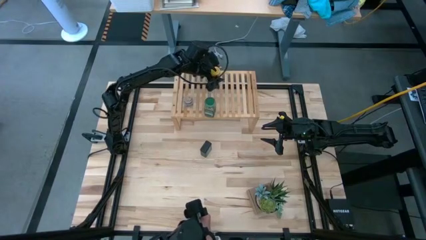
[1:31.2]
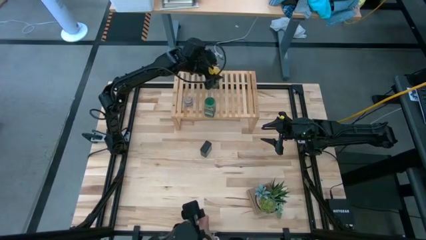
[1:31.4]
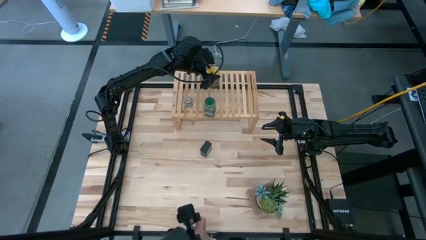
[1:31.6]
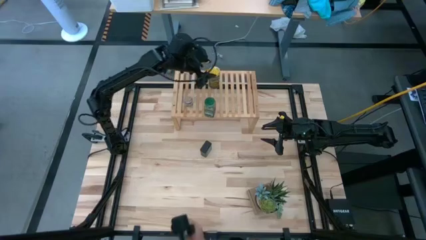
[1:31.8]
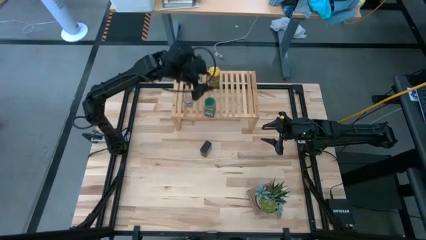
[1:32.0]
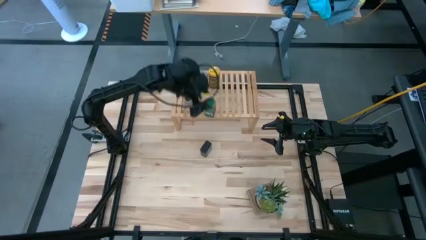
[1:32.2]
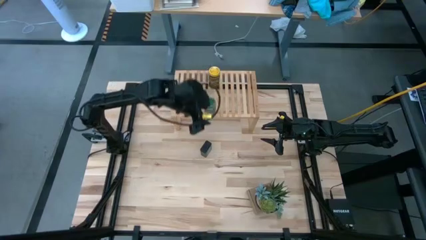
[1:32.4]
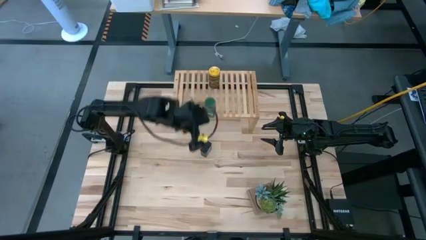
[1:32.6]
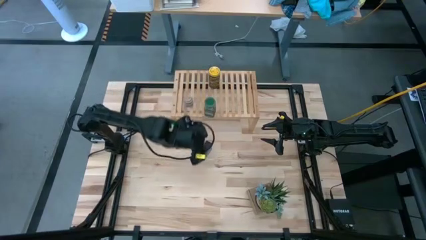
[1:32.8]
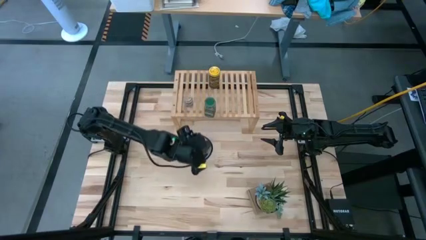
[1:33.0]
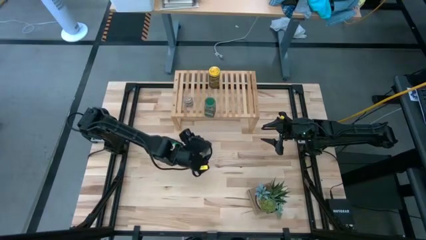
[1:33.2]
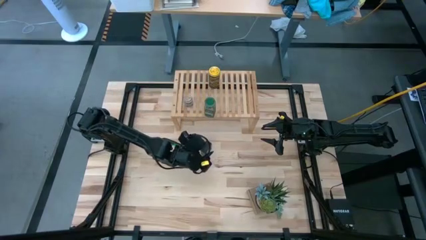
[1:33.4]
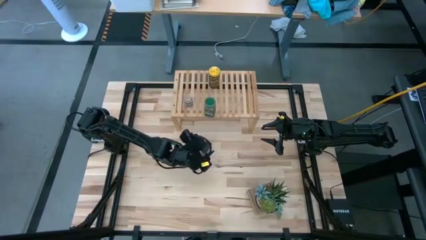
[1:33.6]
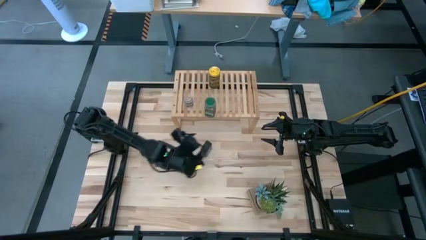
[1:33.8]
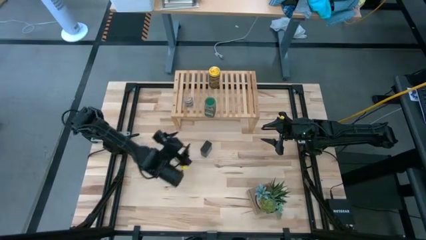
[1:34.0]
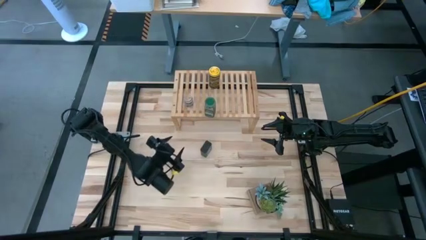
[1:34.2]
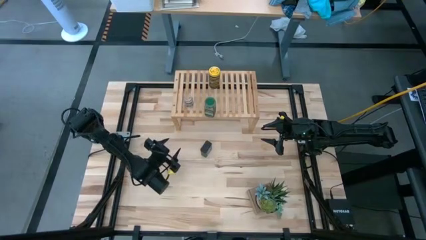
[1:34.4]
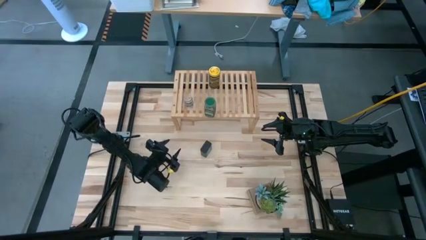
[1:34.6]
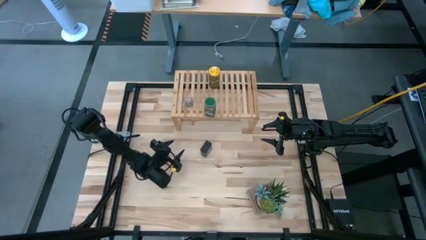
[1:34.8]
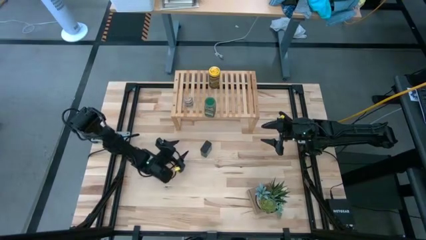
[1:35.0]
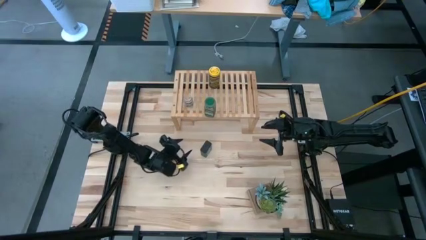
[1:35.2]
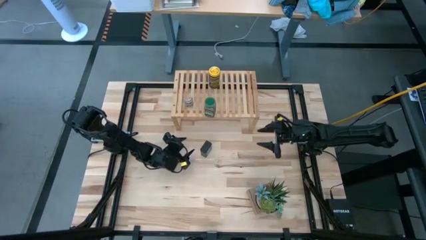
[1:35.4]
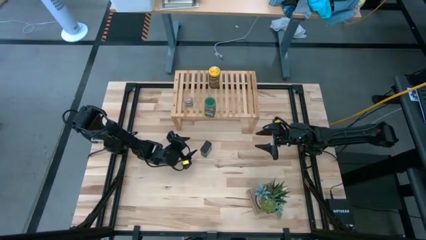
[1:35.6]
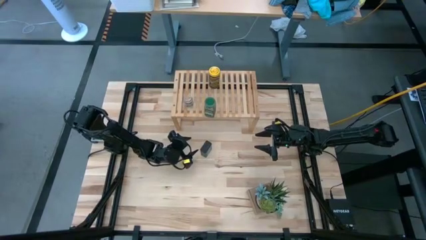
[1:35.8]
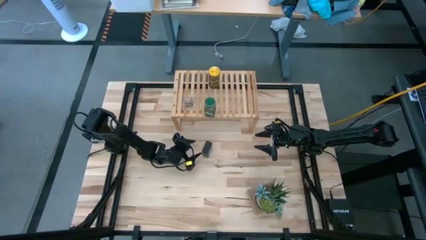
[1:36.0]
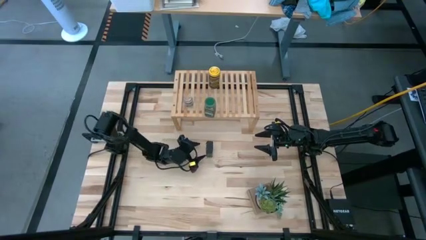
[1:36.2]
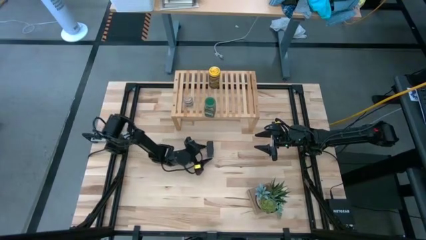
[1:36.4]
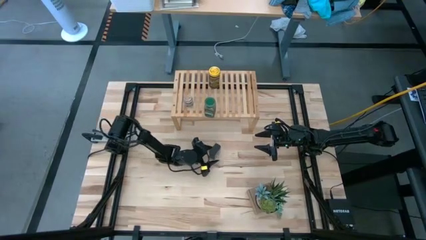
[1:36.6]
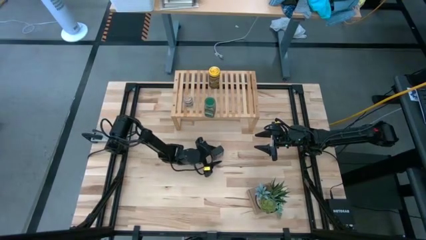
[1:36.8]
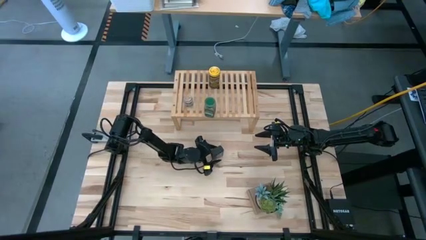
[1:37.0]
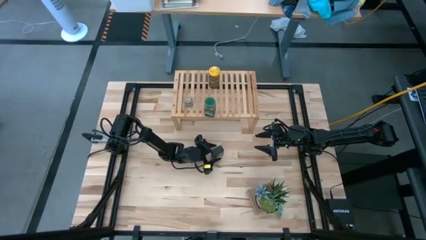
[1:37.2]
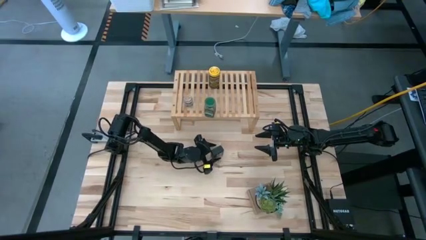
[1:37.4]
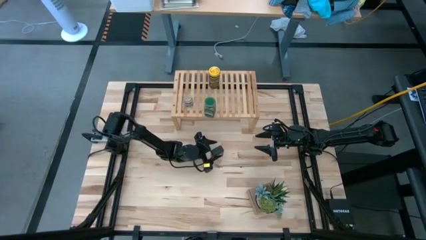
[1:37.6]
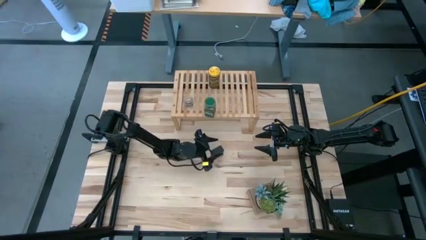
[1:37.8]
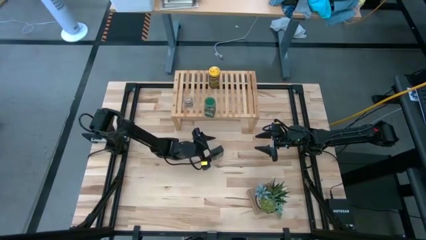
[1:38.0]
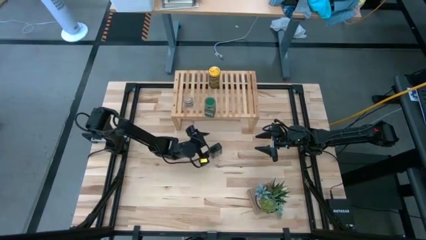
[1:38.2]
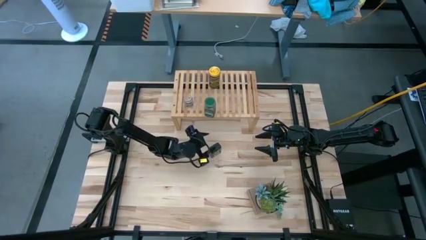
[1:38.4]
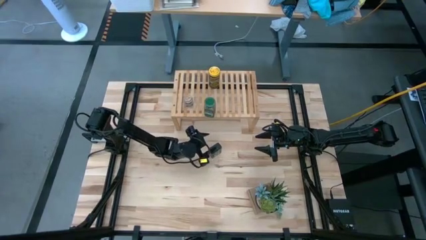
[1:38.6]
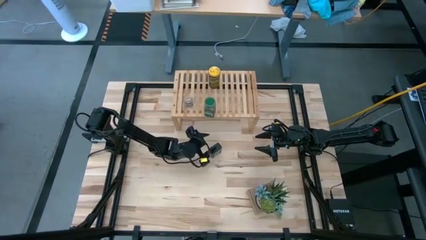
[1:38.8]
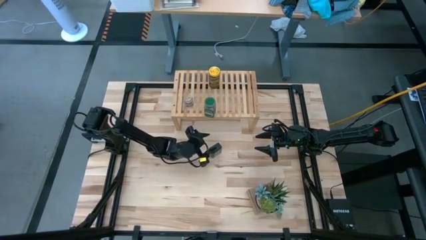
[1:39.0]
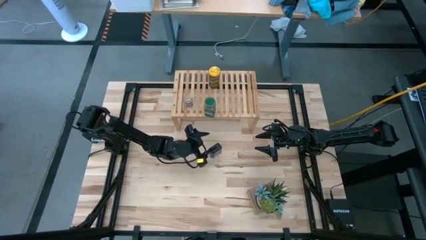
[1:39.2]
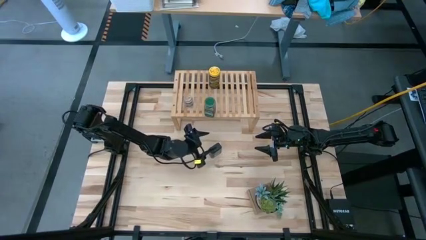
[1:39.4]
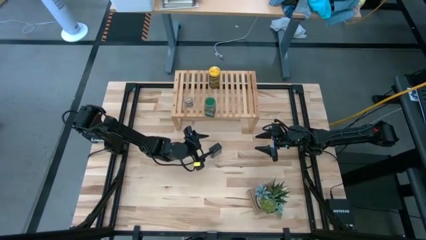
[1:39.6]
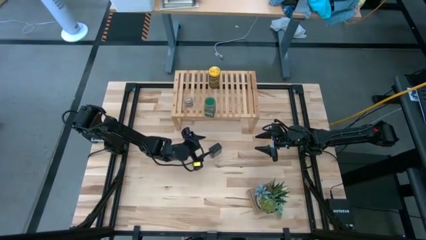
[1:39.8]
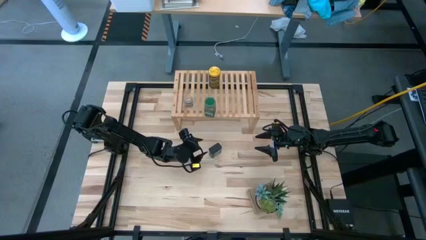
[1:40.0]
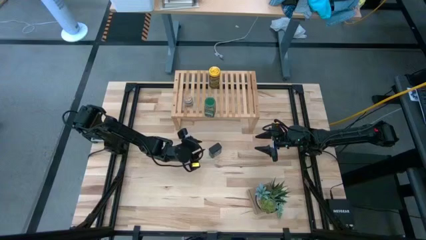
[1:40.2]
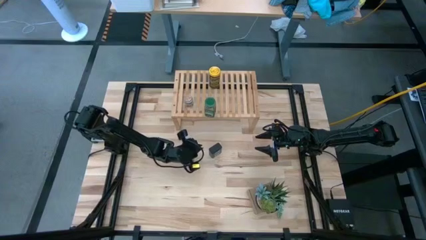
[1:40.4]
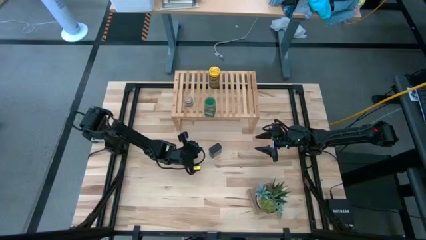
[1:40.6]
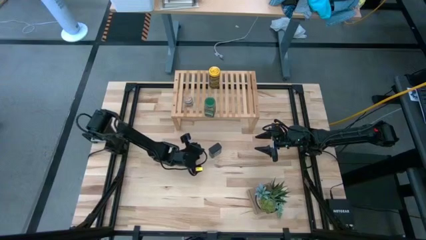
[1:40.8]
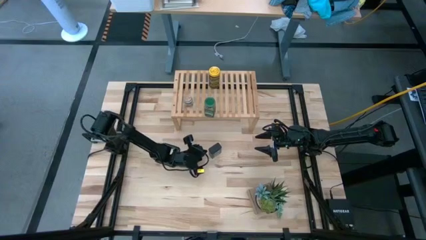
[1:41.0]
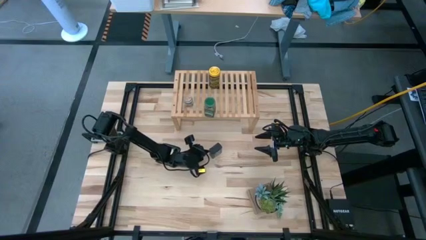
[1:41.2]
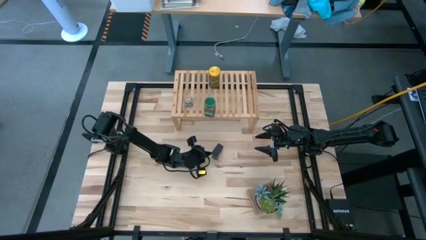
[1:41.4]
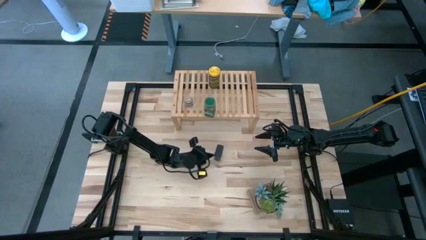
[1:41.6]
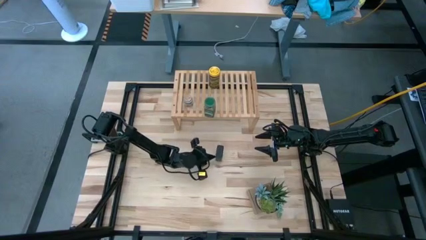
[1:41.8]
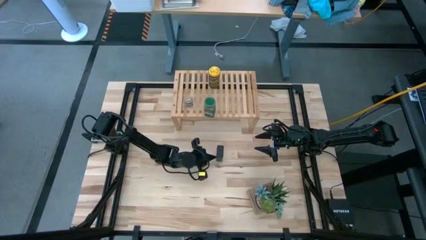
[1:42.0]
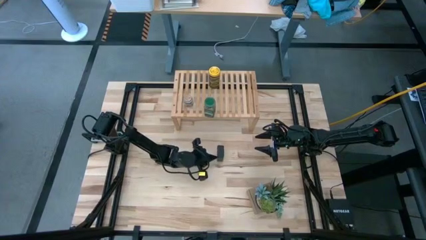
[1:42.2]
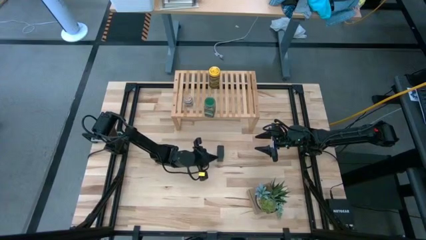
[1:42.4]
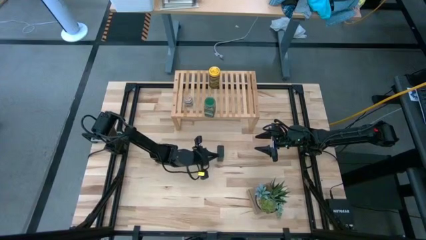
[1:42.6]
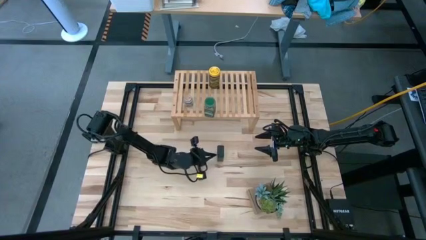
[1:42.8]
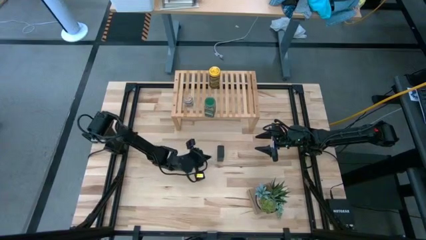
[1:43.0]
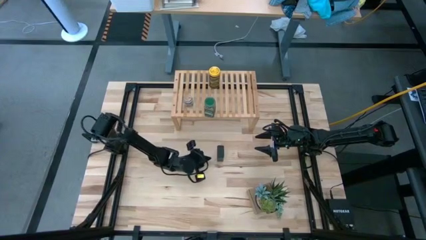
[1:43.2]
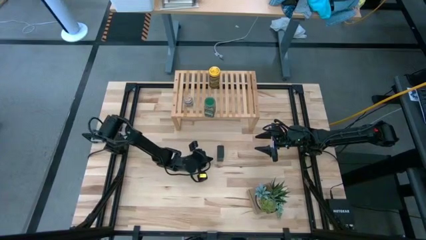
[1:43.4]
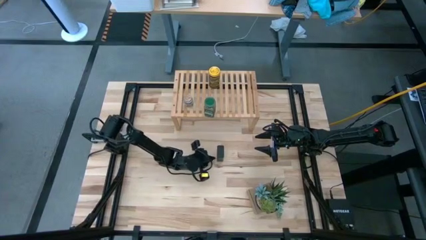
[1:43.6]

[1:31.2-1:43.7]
Task: Shelf spices
Put the black seasoning can on the shelf

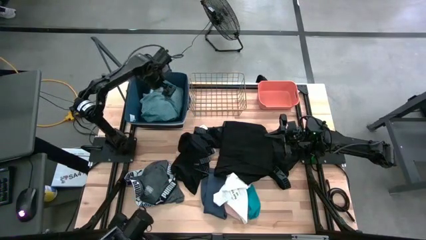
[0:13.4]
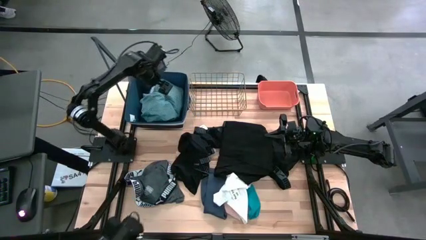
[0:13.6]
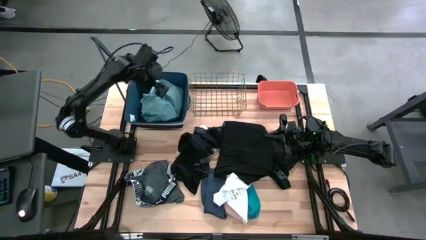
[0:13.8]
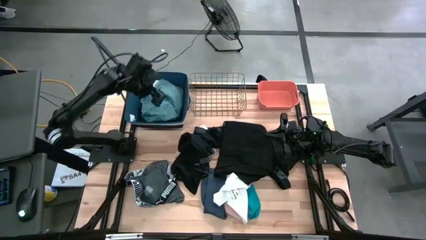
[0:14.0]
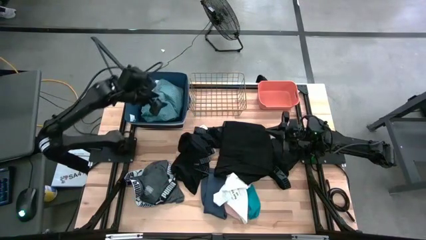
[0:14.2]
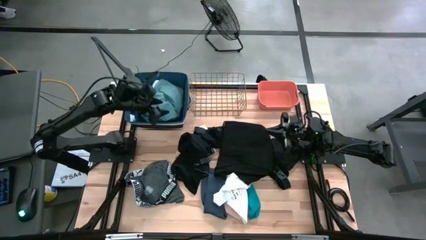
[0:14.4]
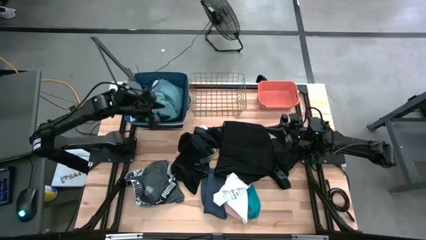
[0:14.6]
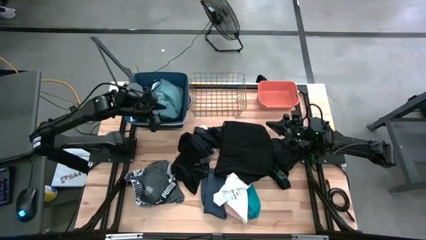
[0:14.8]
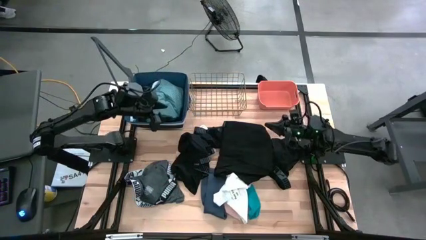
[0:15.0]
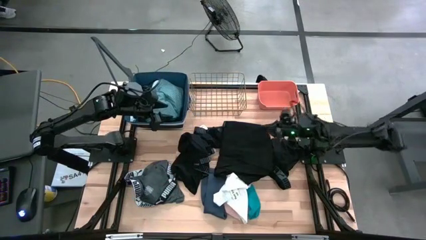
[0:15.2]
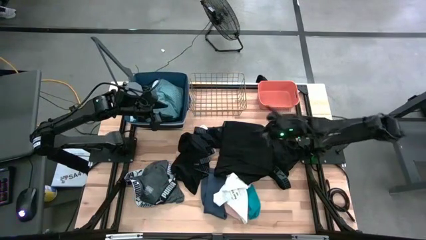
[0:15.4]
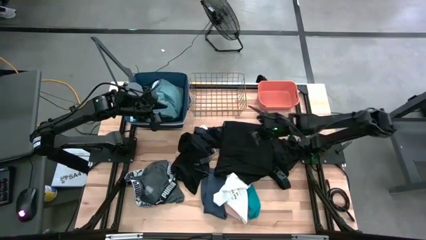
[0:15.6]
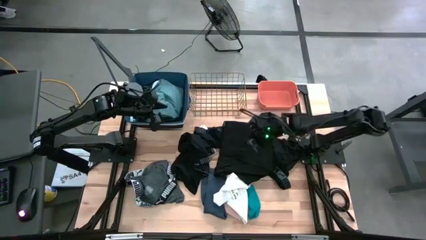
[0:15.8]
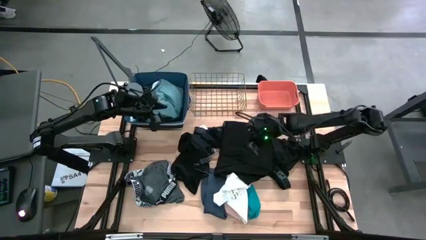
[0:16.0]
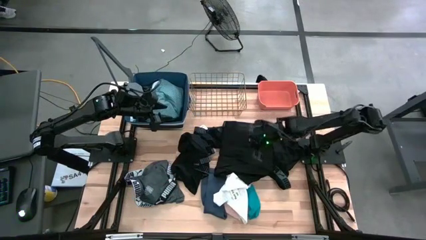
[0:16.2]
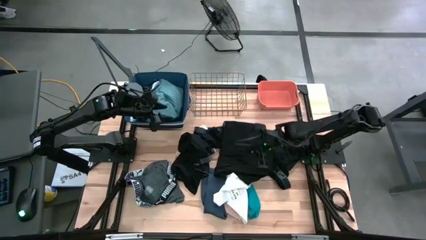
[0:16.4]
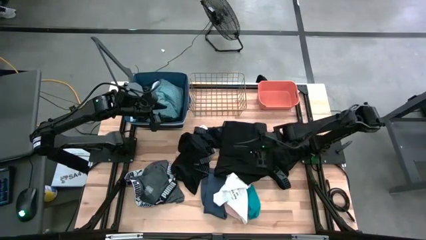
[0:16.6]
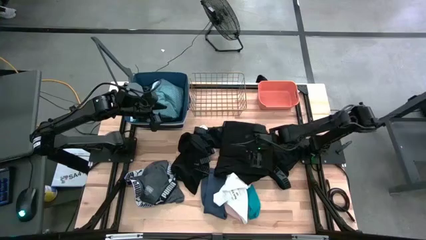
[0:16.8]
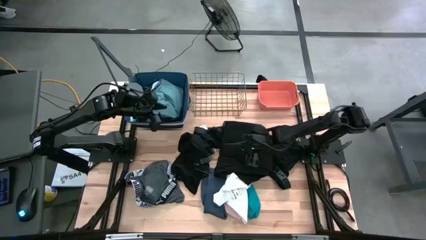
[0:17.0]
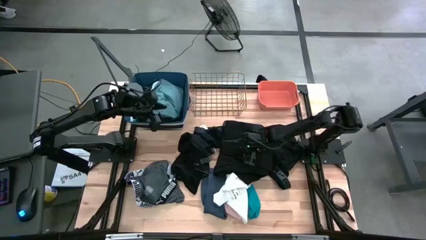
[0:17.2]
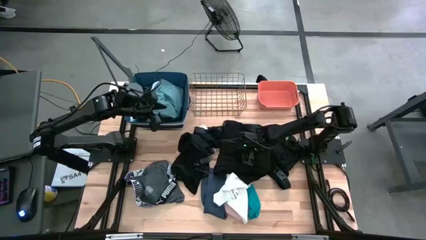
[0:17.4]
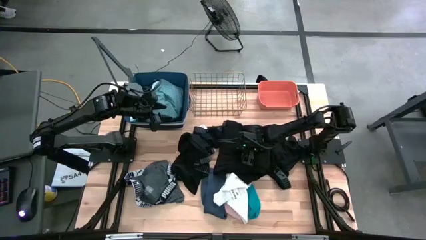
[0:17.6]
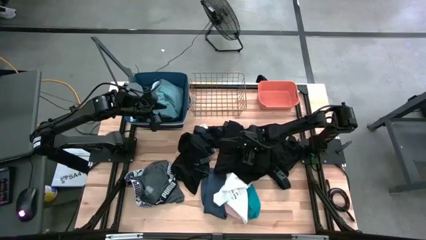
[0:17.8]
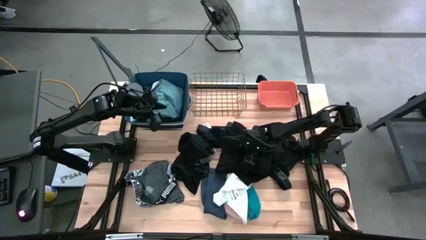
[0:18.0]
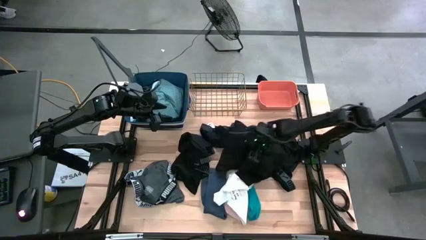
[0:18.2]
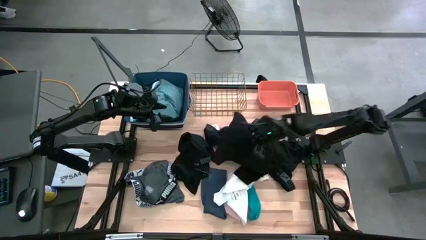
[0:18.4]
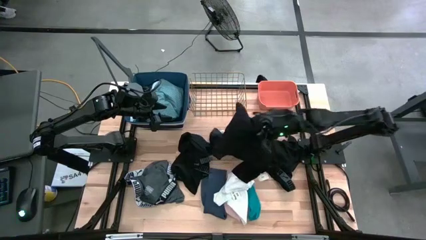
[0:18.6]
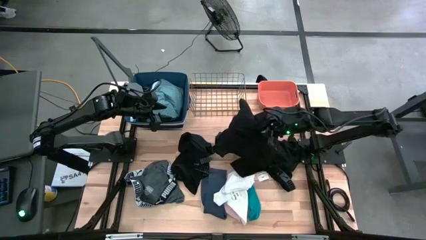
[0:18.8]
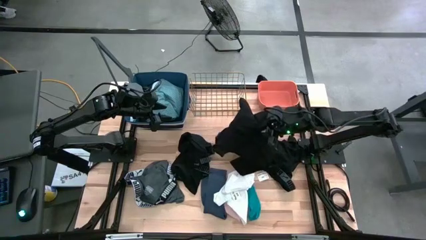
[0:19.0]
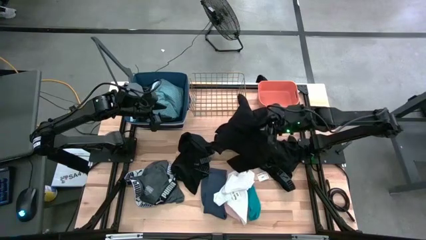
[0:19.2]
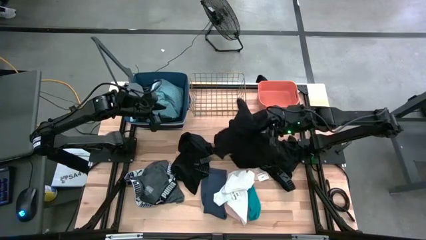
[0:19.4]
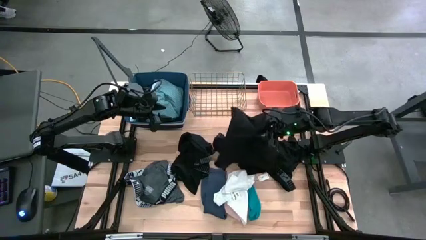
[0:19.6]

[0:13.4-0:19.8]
Task: Pick & Place Cloths
Put the black shirt into the blue bin
